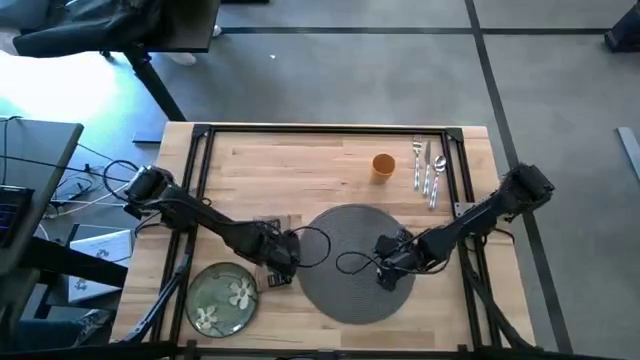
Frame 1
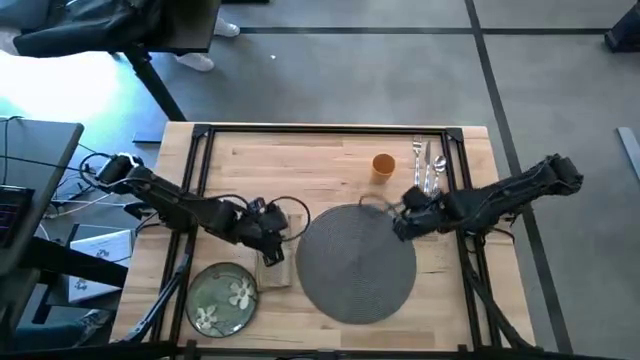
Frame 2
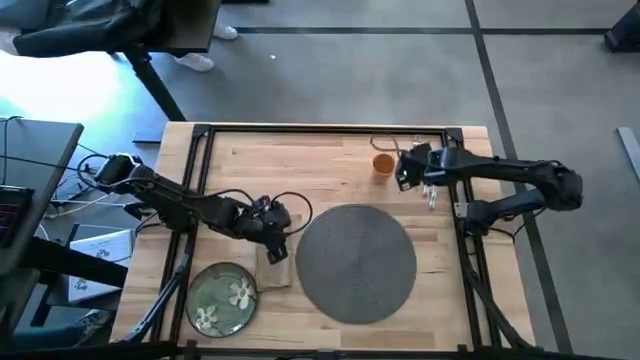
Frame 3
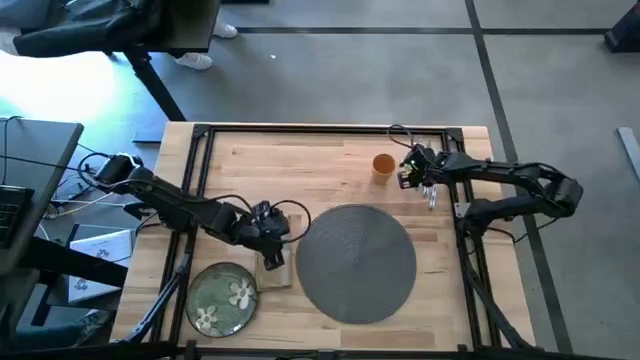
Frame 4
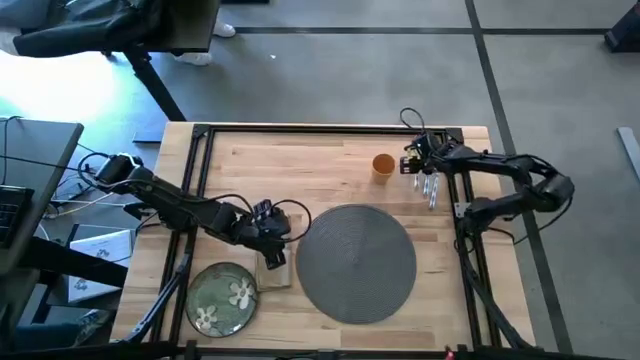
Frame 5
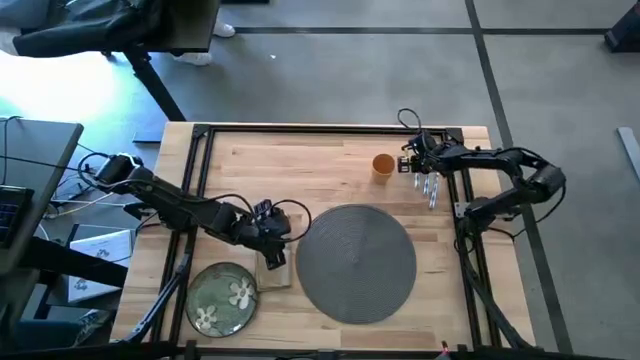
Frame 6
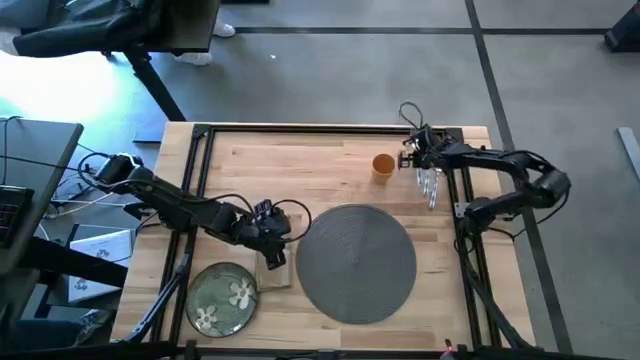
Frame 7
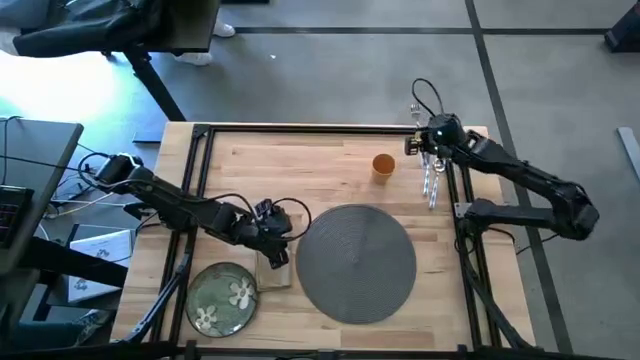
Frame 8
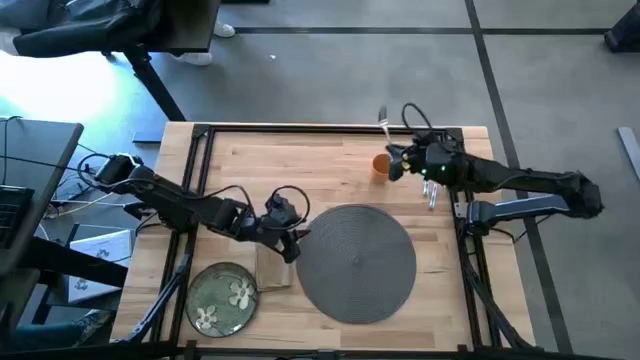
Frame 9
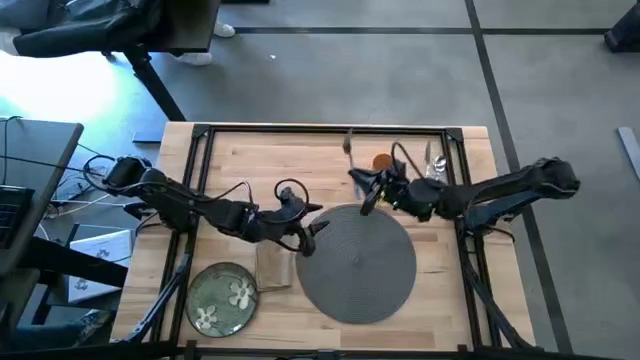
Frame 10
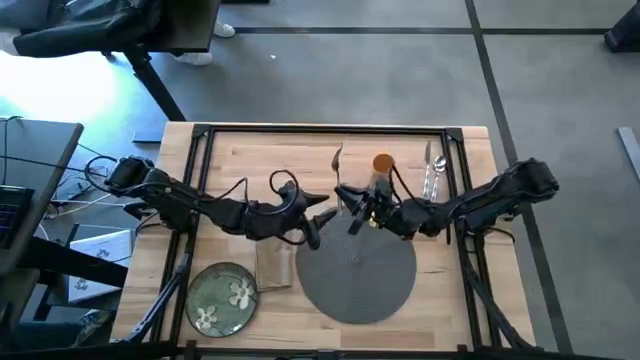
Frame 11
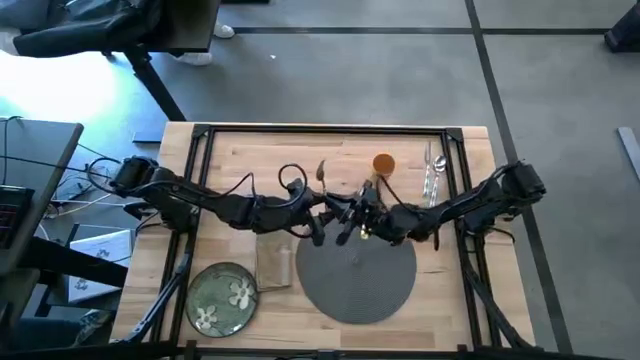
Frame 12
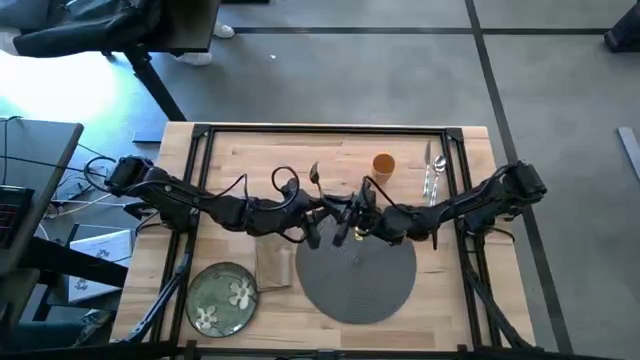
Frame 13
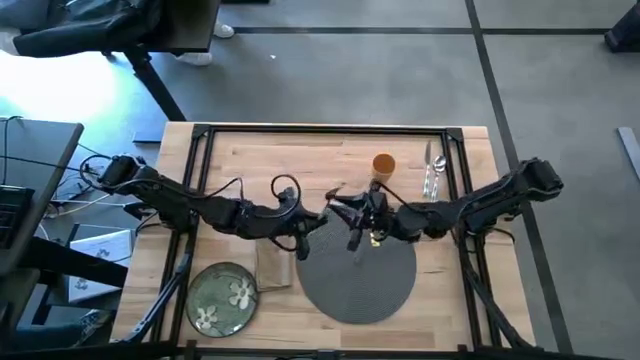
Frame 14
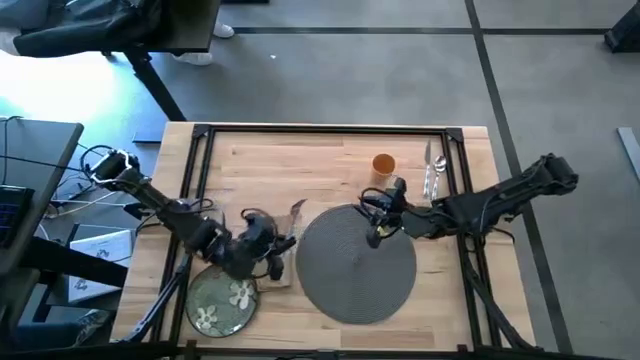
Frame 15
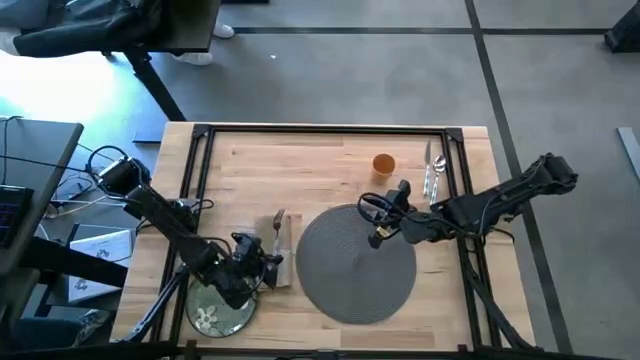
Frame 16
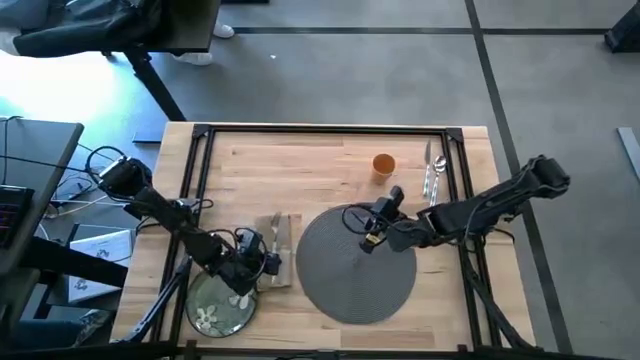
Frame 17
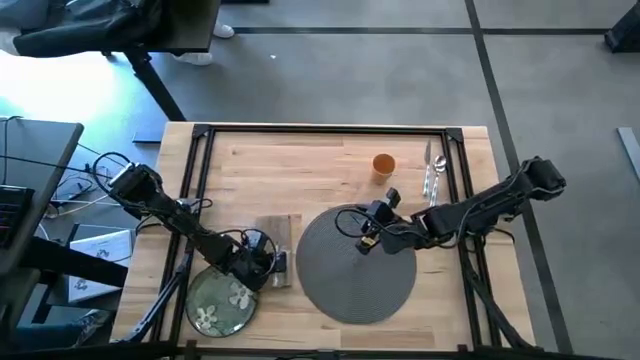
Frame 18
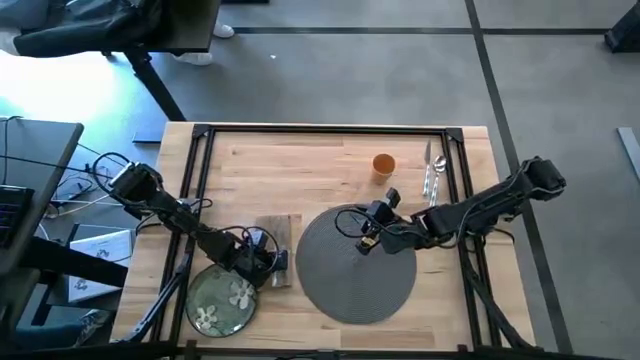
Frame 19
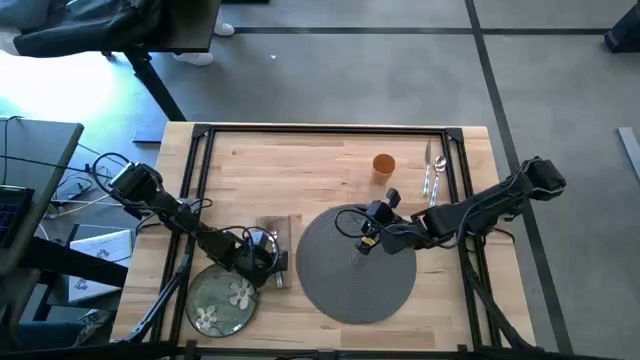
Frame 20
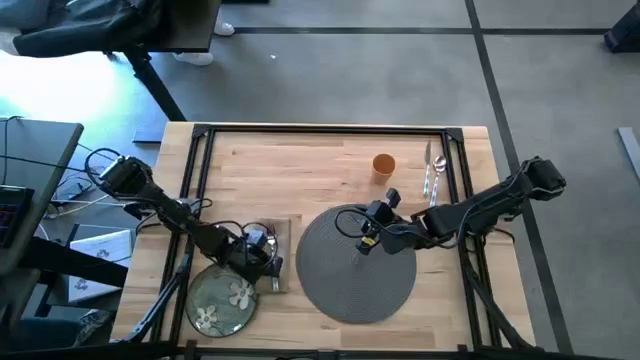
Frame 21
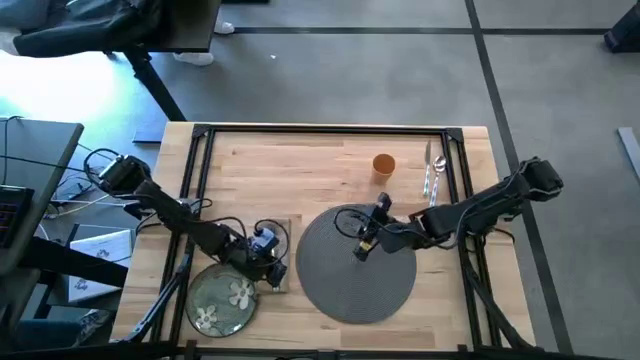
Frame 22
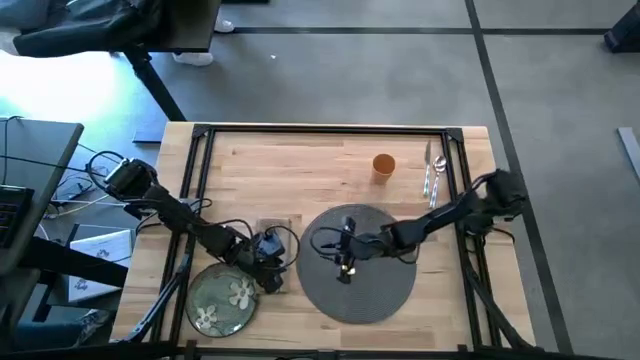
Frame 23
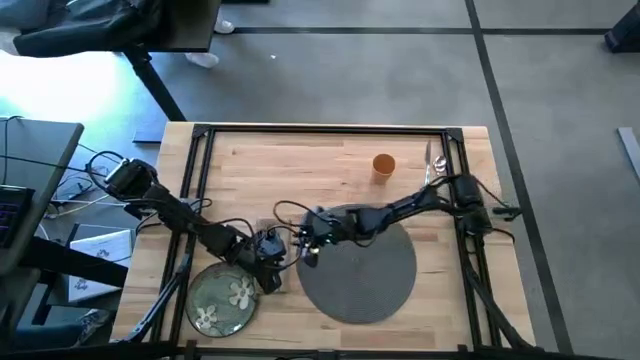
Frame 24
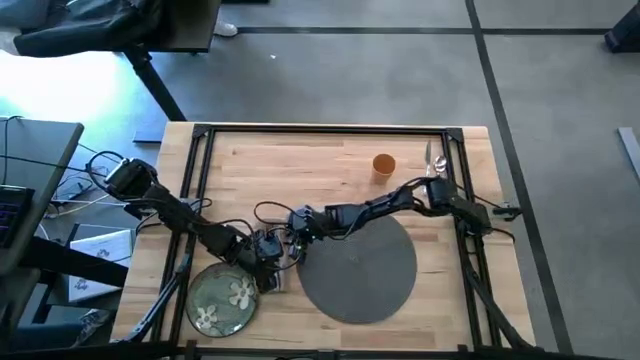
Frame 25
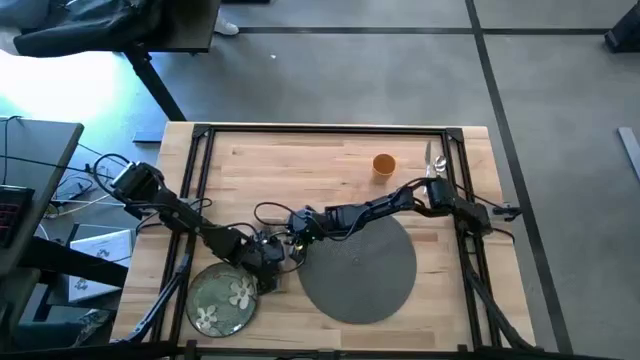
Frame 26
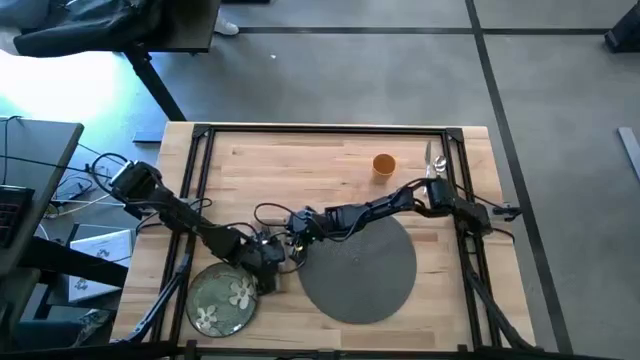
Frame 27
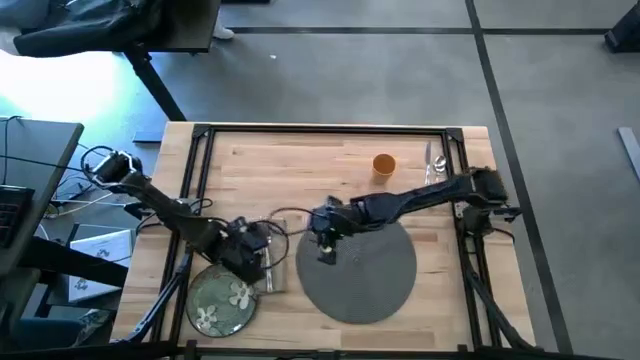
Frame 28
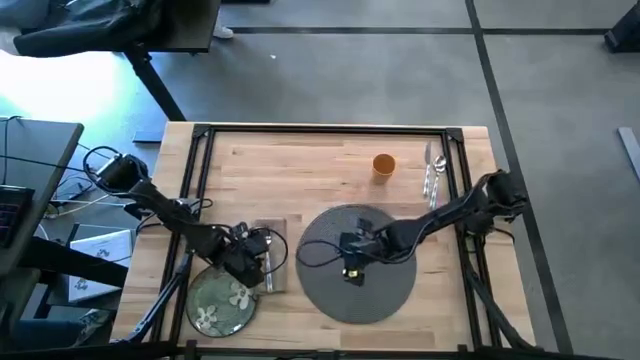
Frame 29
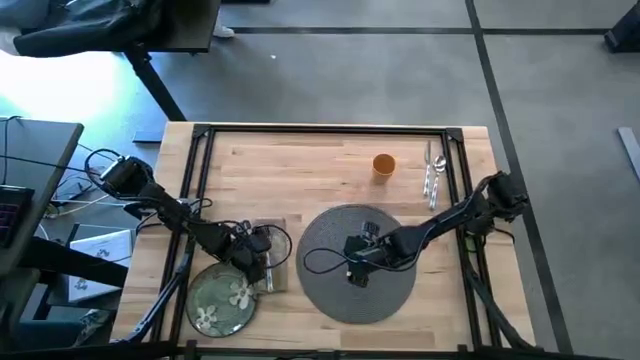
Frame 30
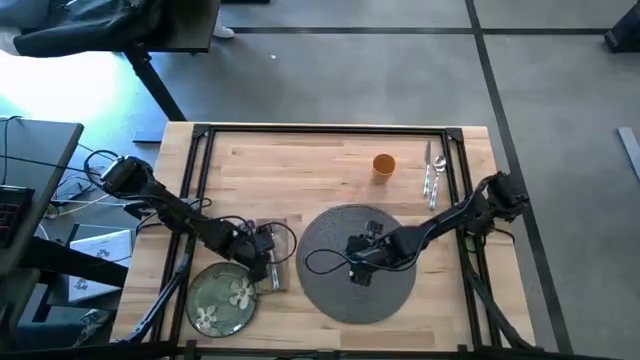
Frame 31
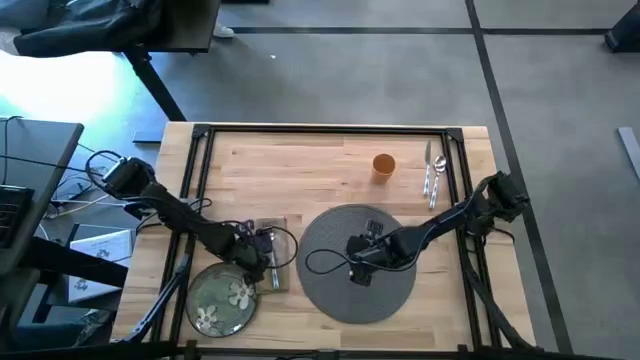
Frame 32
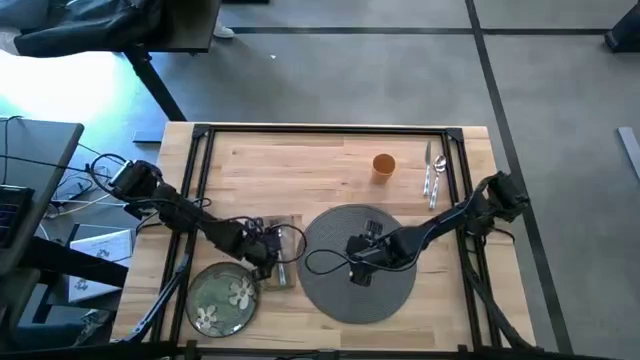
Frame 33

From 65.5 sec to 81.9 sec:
Task: Set table place
Put the fork on the brown napkin

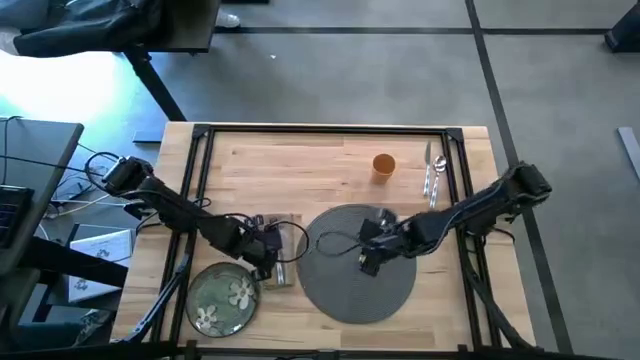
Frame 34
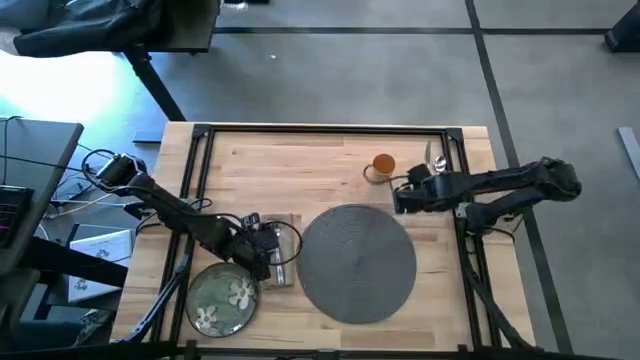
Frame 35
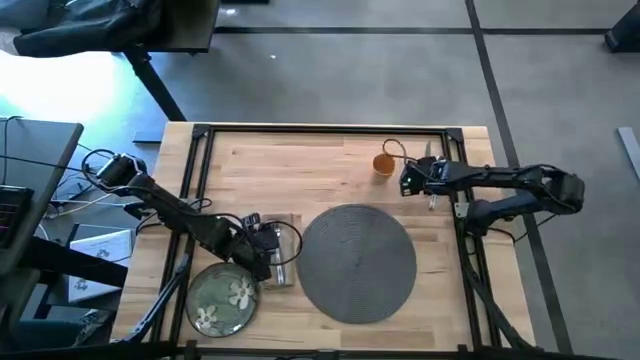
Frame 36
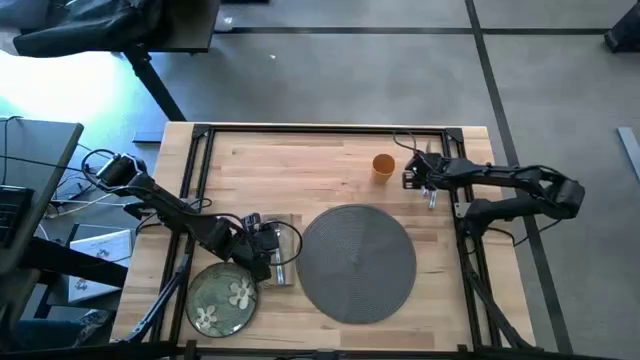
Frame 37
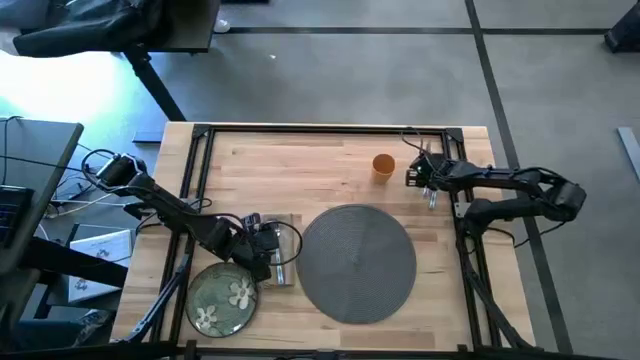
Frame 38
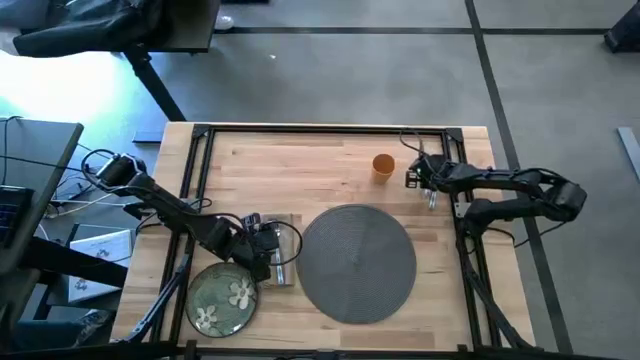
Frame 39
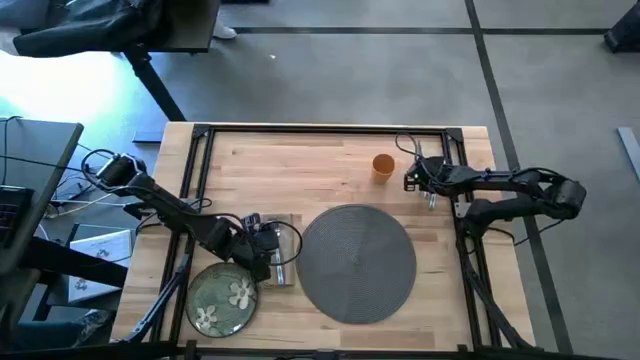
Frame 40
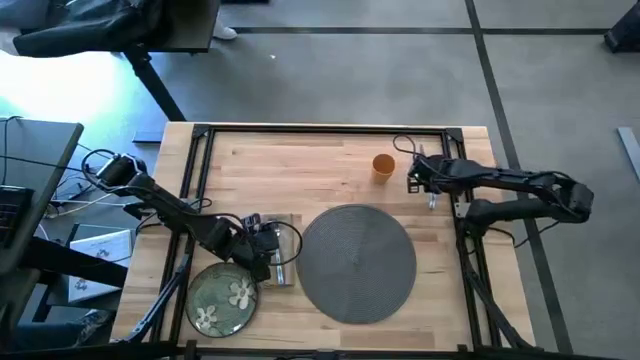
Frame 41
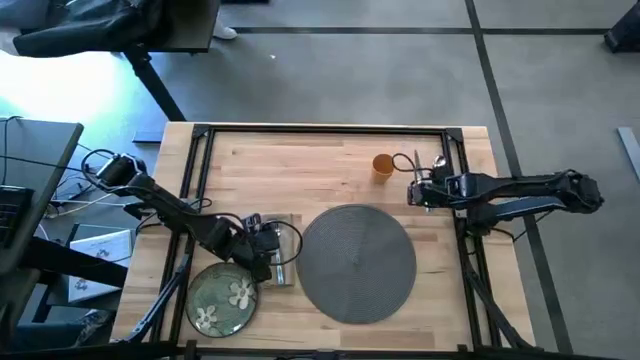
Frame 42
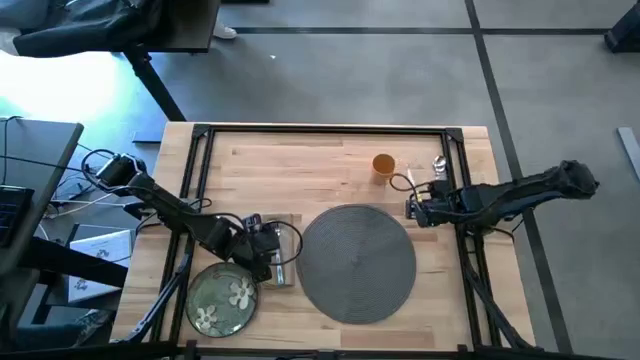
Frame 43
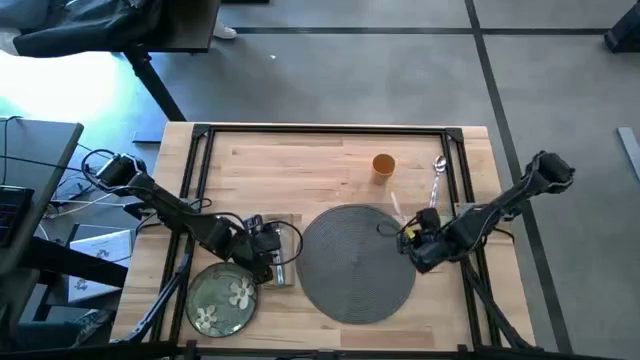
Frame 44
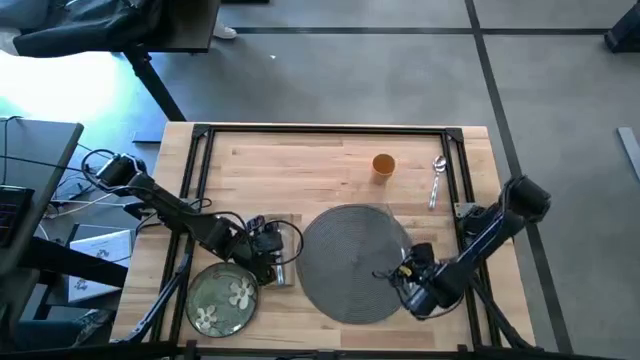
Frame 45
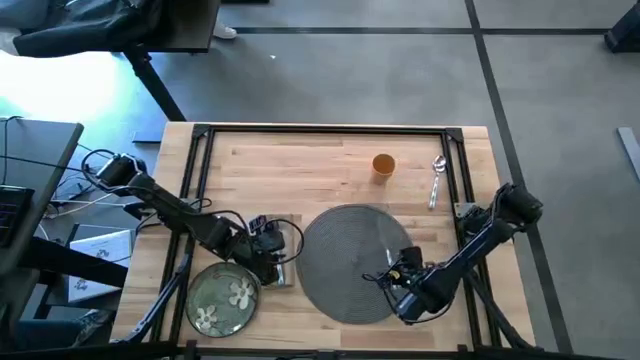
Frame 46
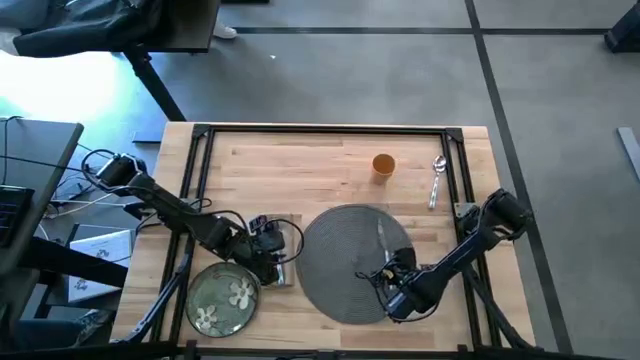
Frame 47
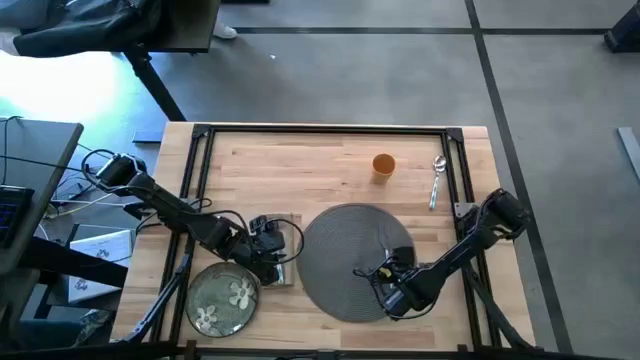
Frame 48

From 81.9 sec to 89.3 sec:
Put the table knife on the right side of the gray table mat
